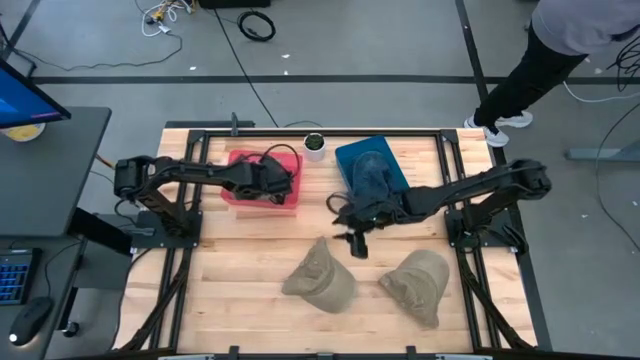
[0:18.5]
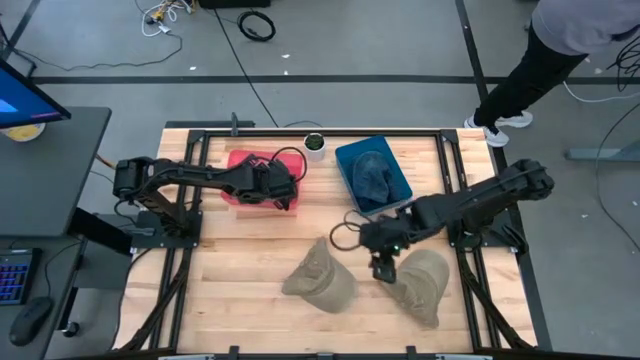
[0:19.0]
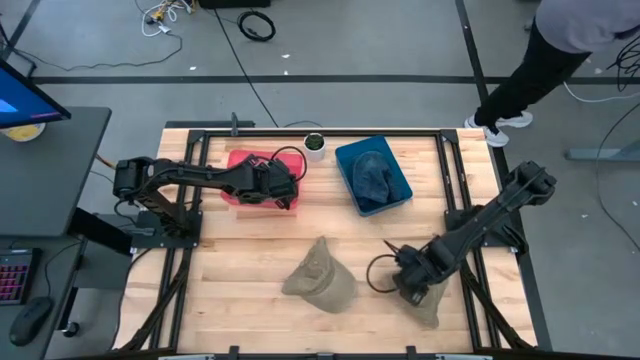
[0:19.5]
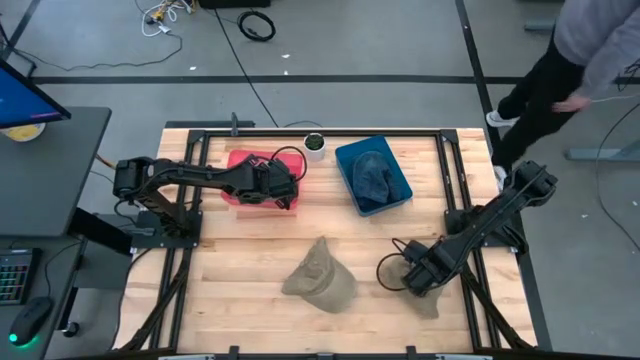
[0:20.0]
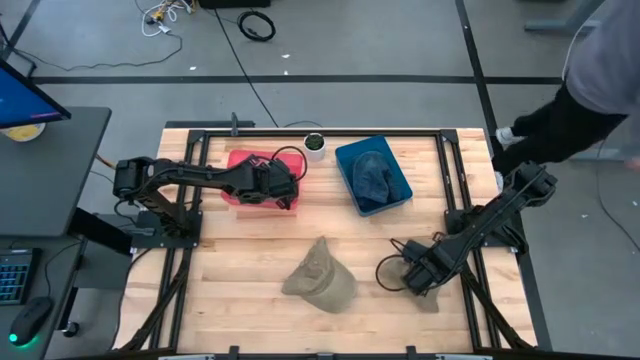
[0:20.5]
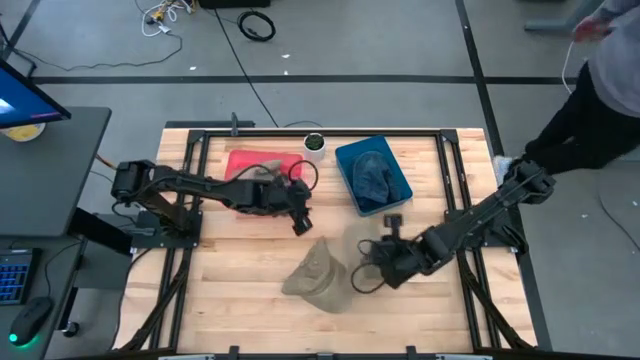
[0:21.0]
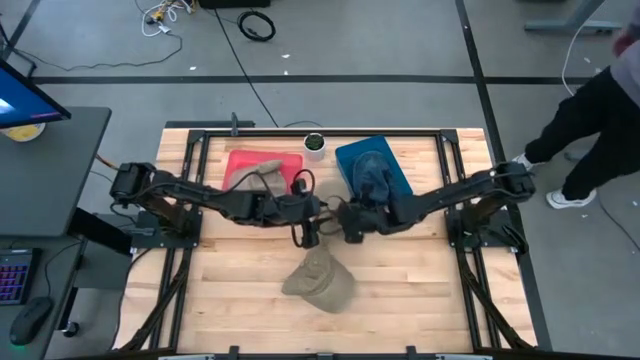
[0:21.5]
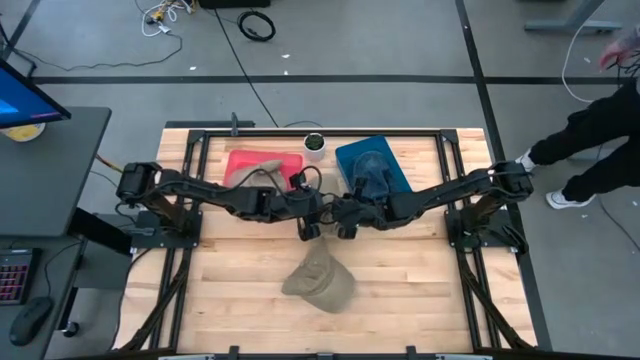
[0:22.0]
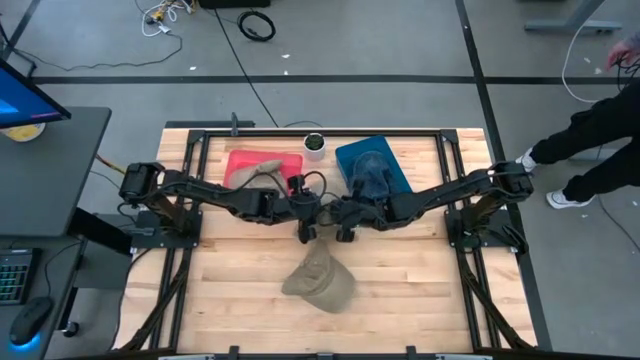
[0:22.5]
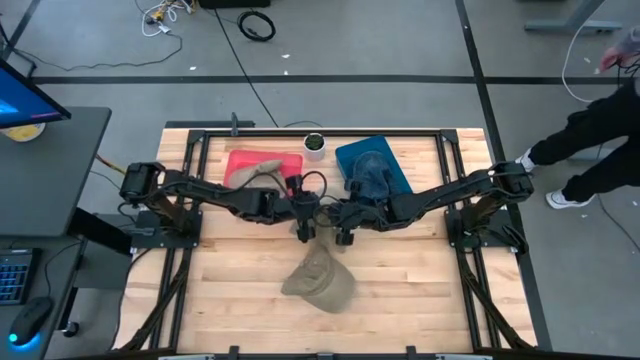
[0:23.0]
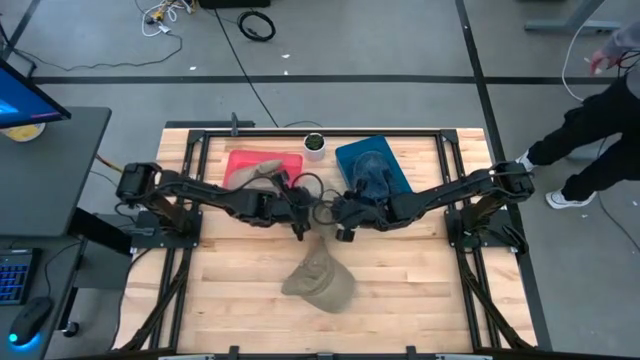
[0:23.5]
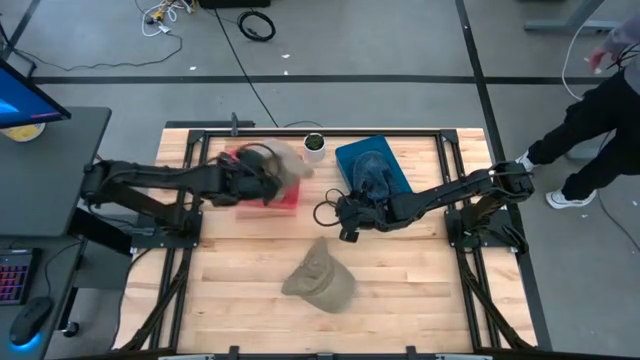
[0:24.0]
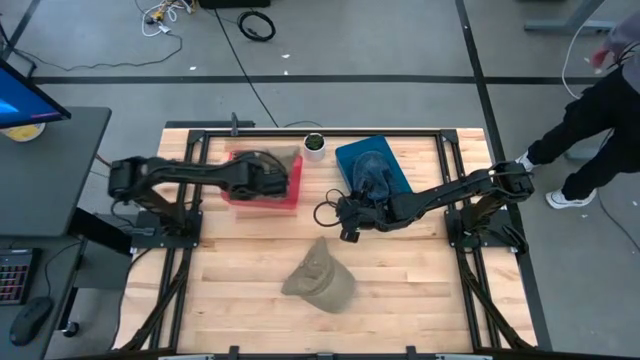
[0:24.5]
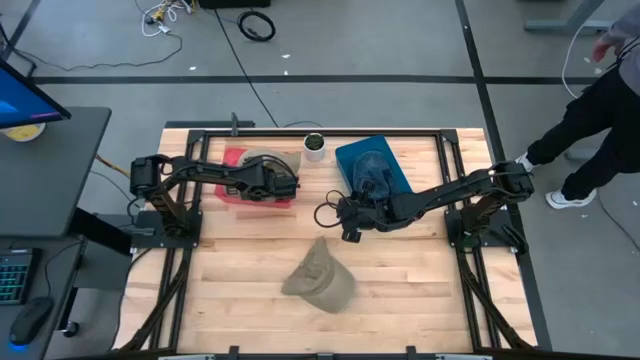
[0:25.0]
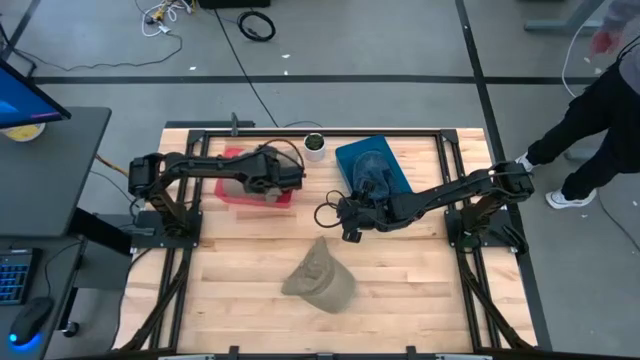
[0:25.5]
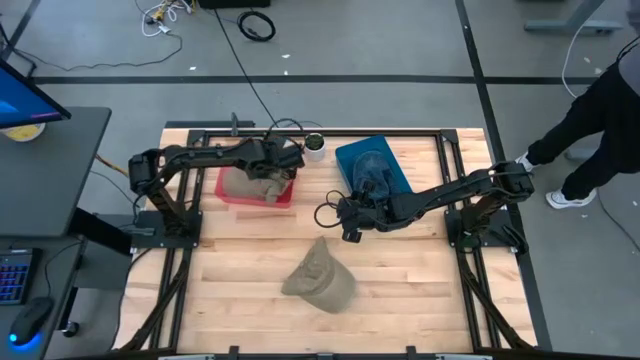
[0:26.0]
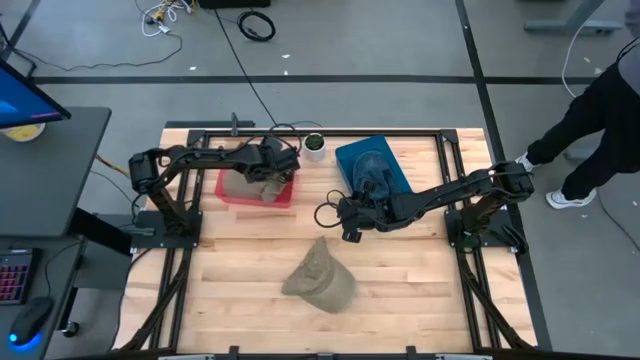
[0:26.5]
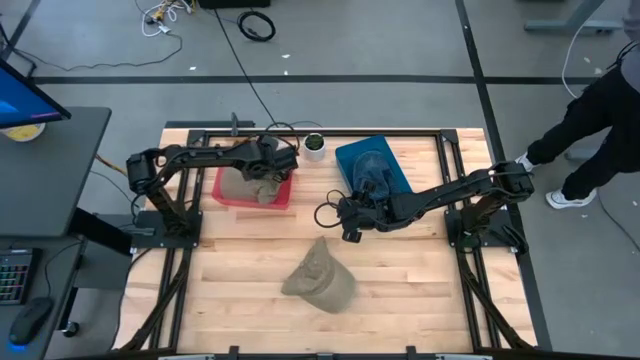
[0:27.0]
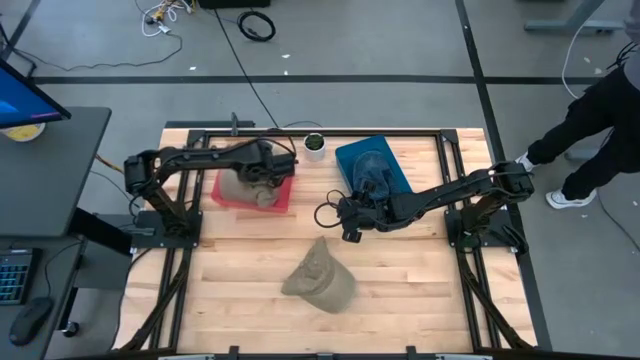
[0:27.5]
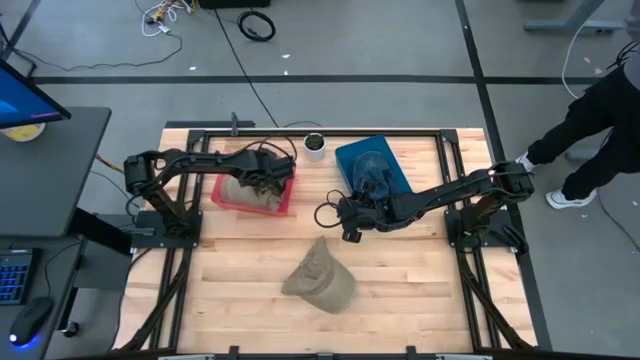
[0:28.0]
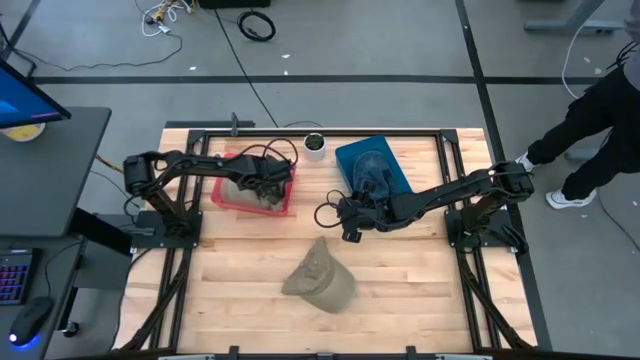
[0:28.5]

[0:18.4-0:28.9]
Task: Pick & Place hat
Put the right brown cap into the red bin

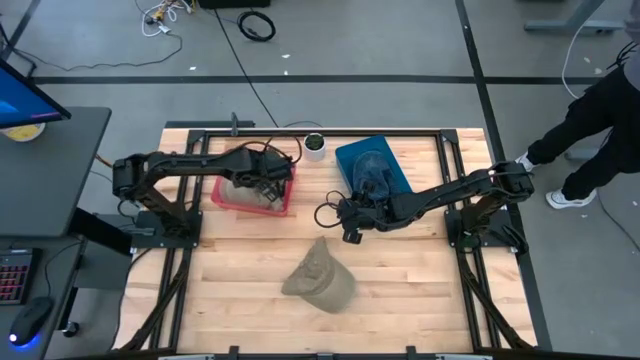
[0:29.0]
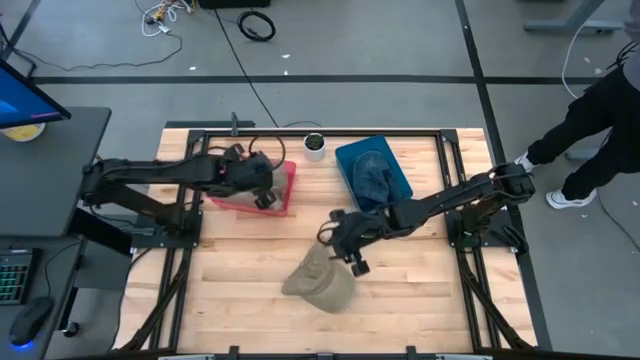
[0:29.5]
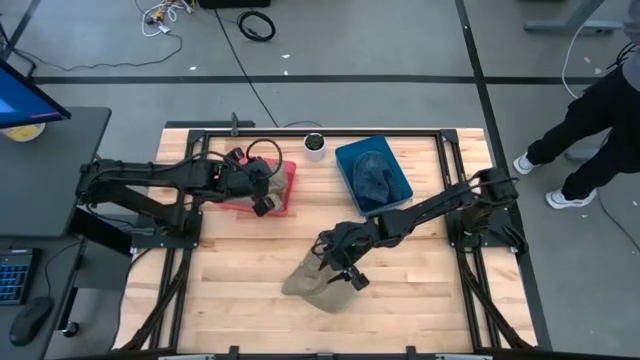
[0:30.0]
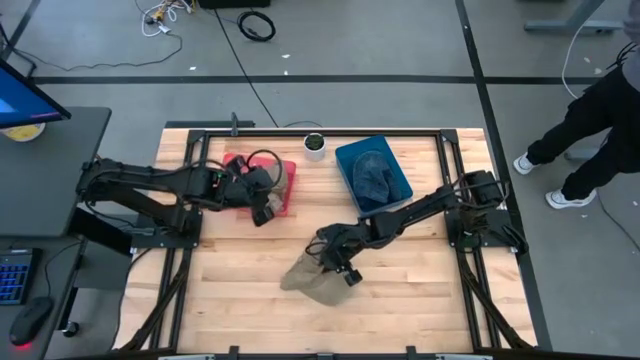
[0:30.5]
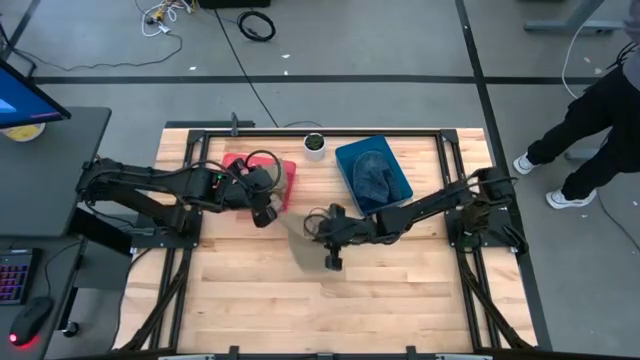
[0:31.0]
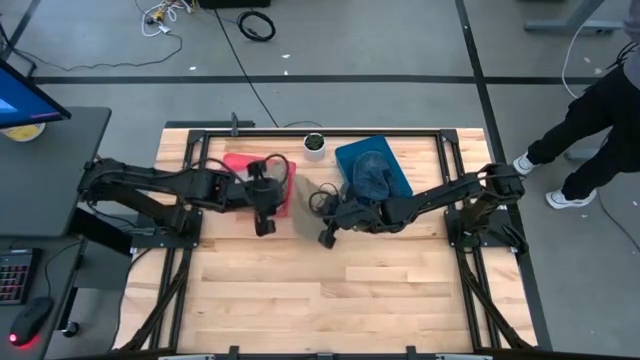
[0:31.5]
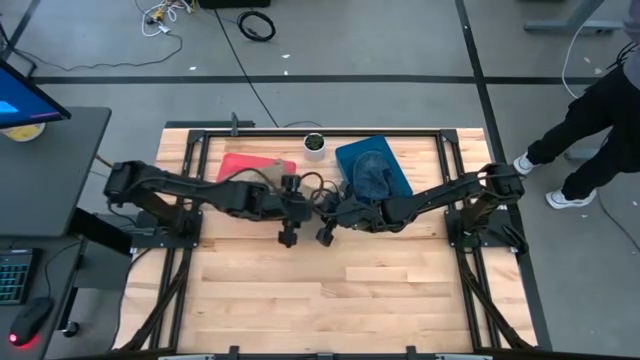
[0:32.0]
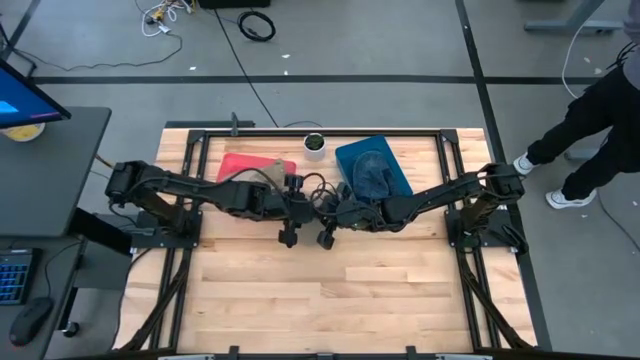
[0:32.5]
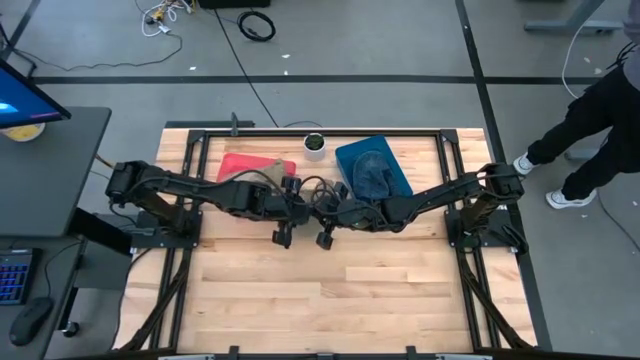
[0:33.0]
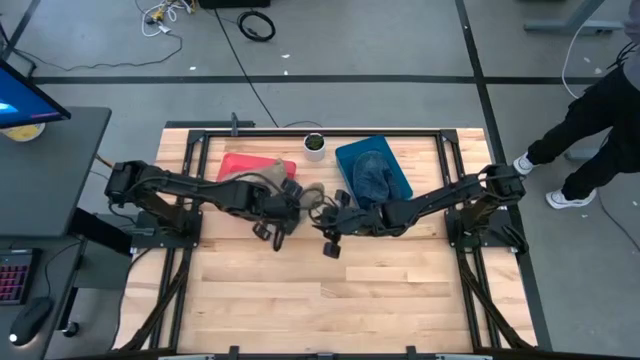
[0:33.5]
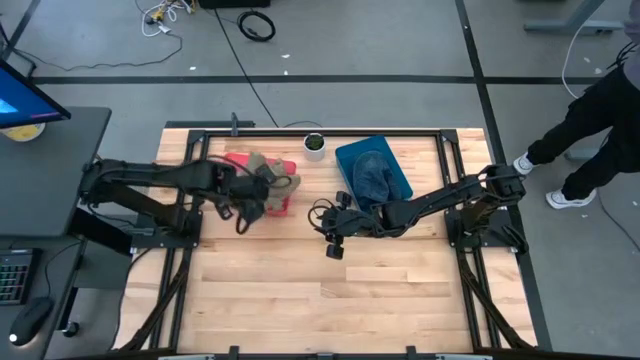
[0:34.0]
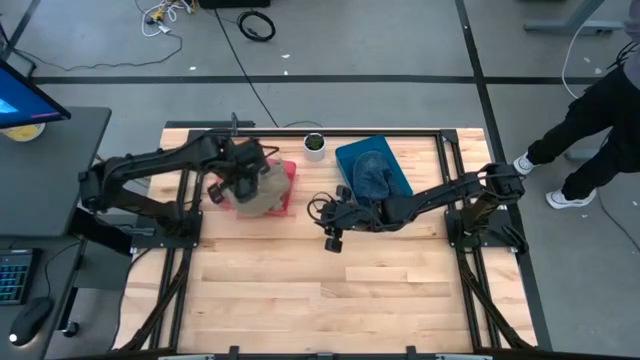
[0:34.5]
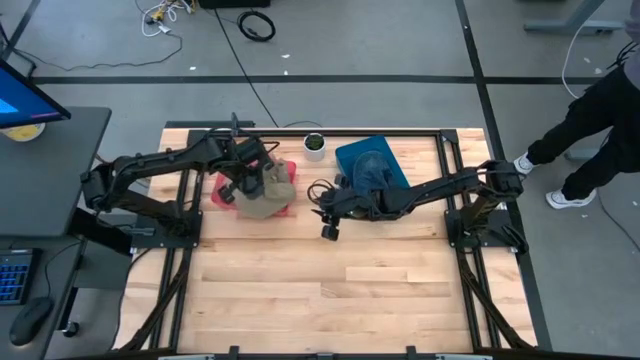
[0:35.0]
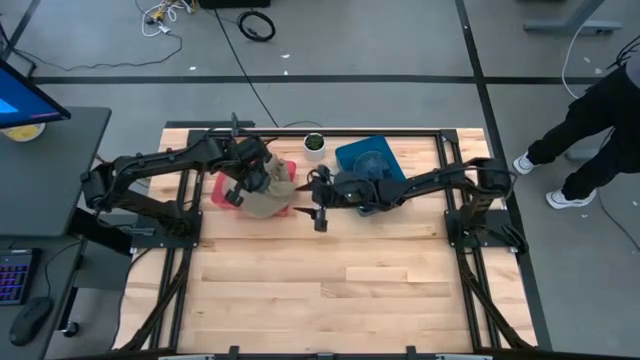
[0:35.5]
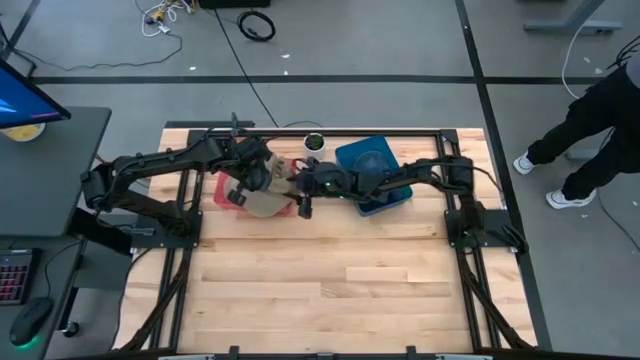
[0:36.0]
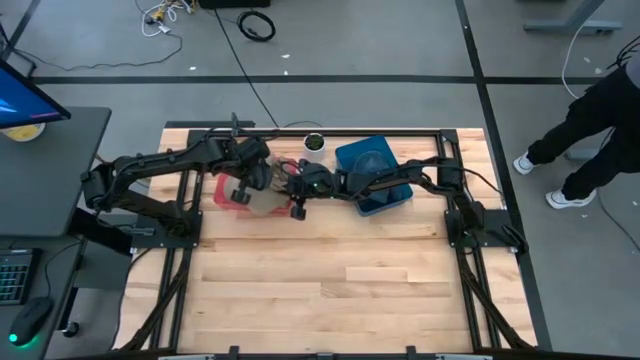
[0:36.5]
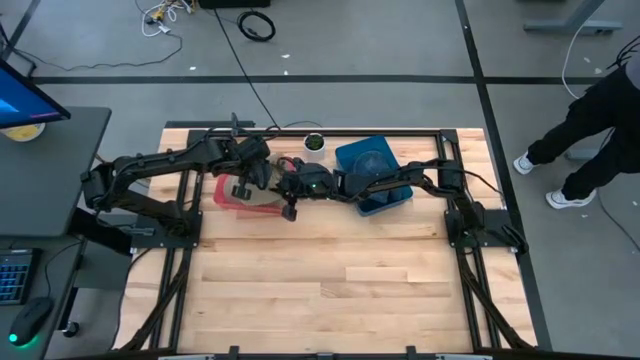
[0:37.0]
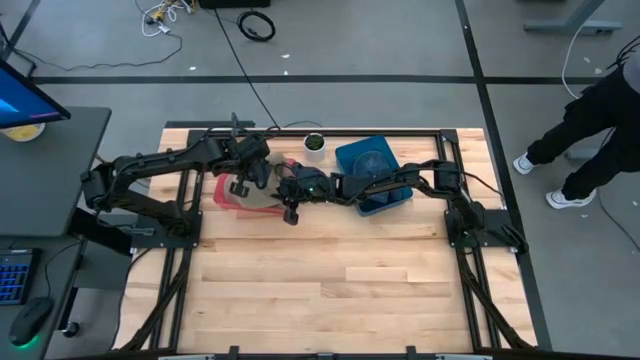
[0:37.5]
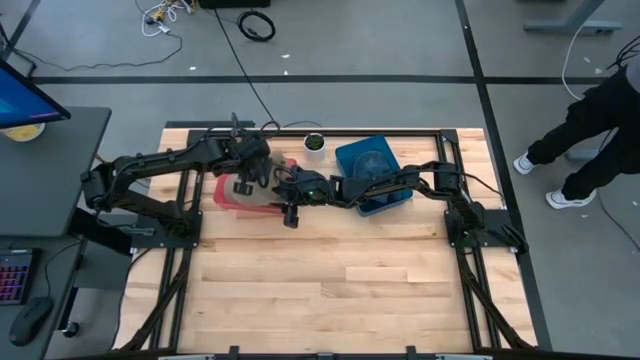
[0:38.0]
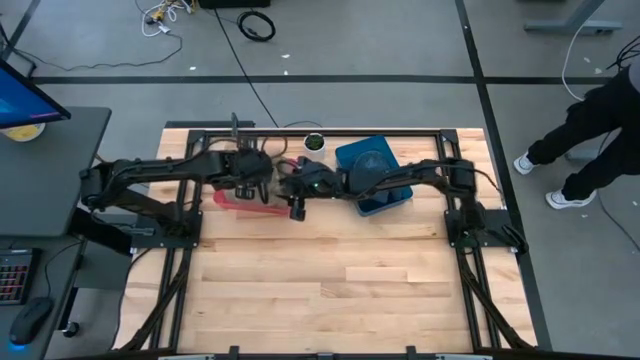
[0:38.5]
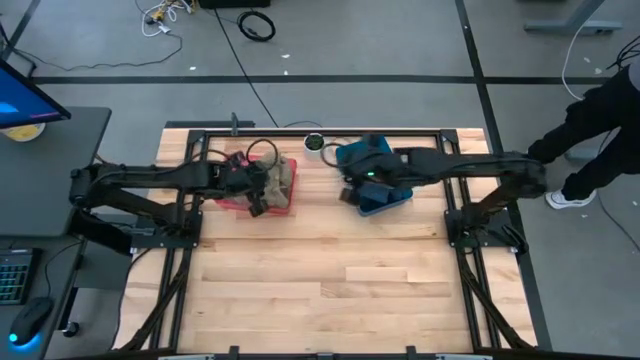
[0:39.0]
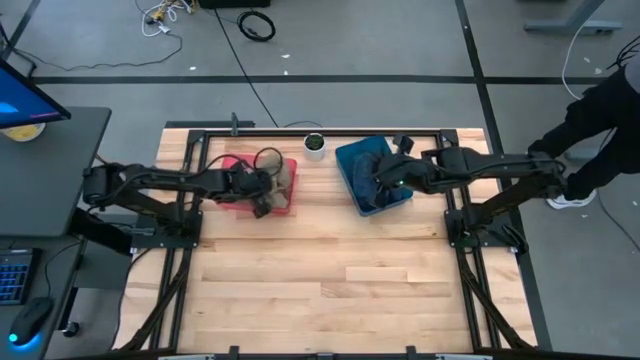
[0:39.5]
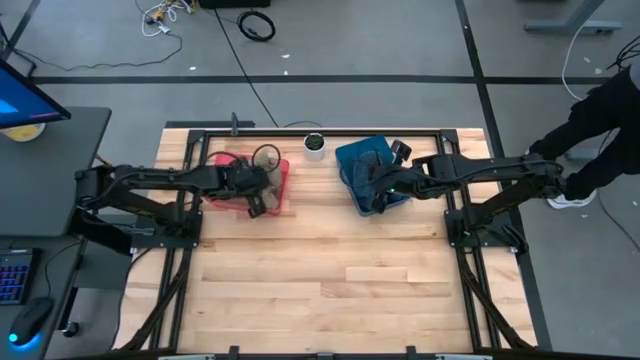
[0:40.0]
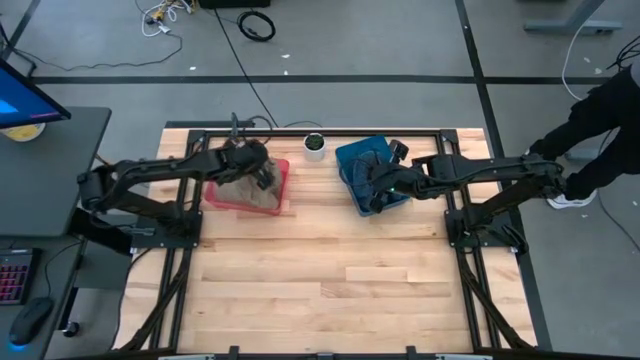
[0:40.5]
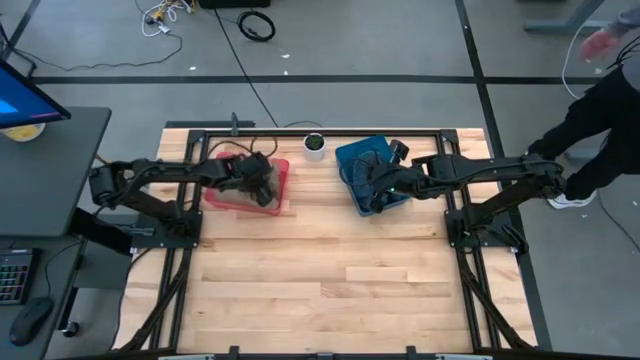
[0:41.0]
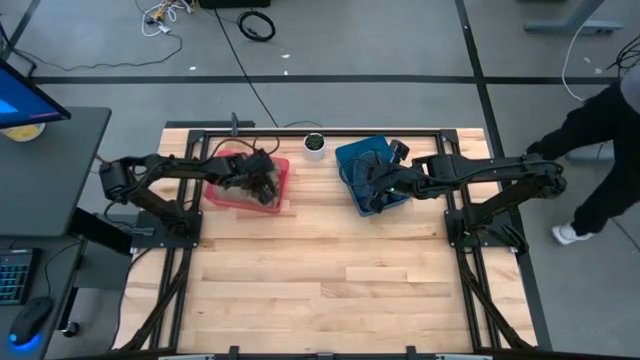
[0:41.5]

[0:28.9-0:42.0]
Put the brown cap into the red bin
